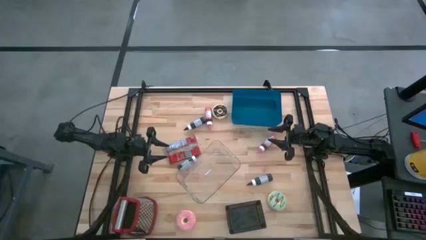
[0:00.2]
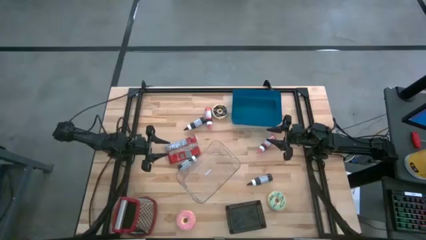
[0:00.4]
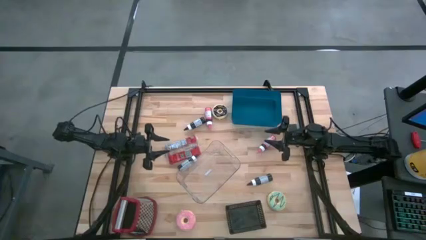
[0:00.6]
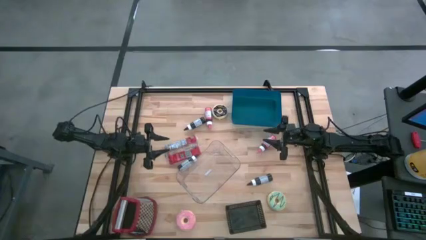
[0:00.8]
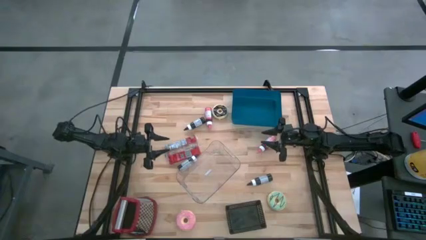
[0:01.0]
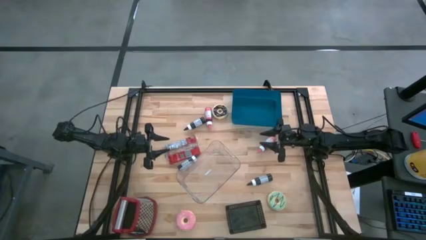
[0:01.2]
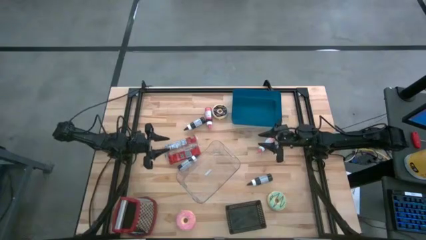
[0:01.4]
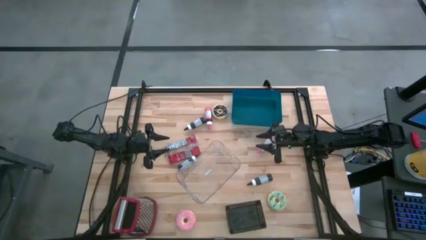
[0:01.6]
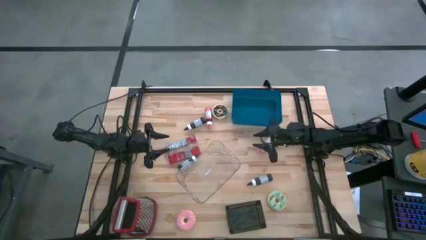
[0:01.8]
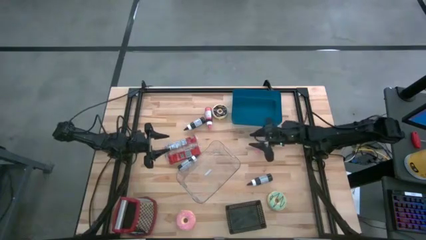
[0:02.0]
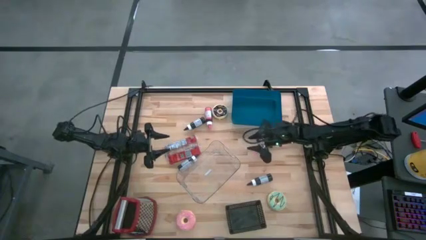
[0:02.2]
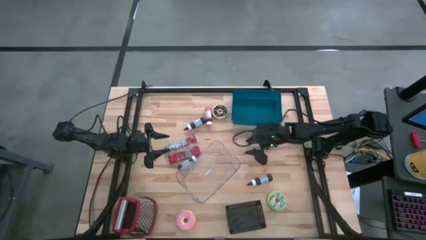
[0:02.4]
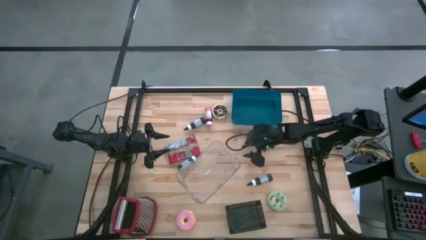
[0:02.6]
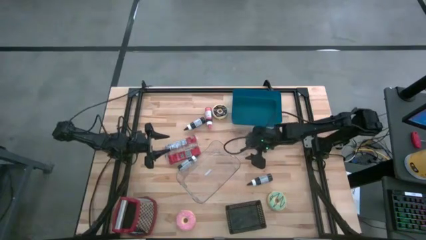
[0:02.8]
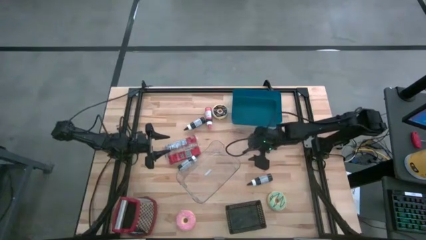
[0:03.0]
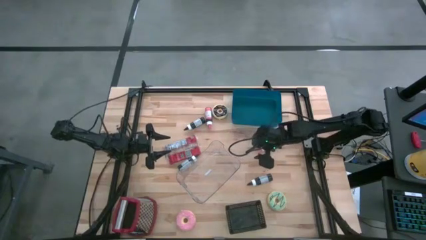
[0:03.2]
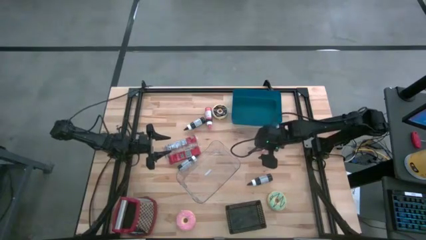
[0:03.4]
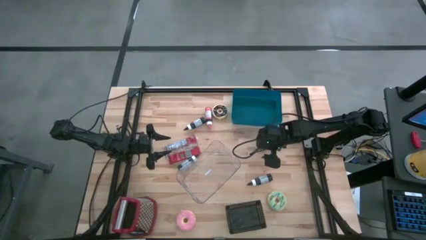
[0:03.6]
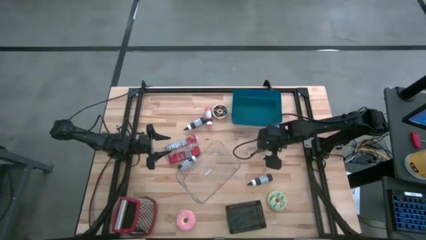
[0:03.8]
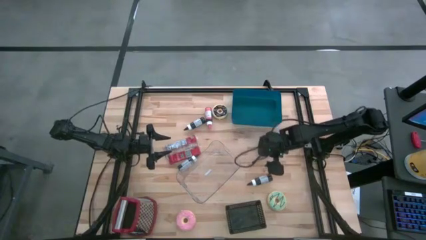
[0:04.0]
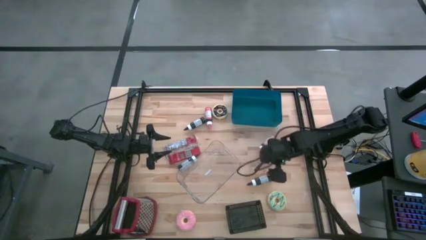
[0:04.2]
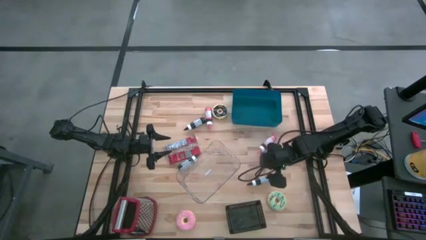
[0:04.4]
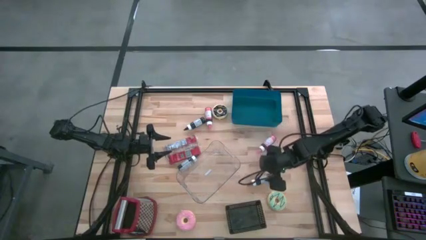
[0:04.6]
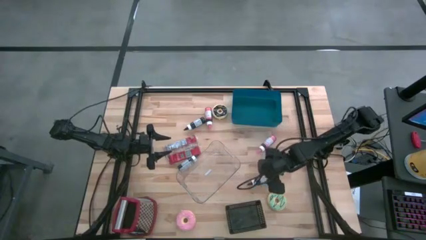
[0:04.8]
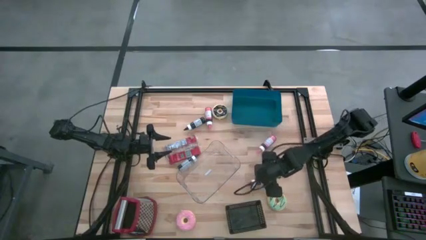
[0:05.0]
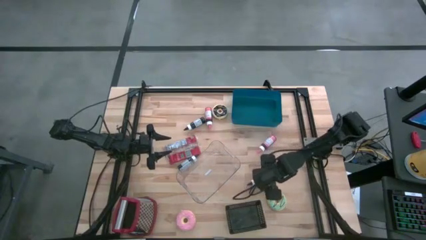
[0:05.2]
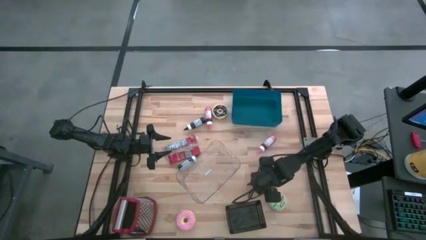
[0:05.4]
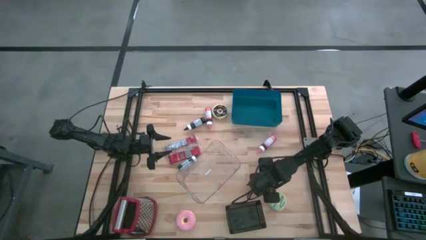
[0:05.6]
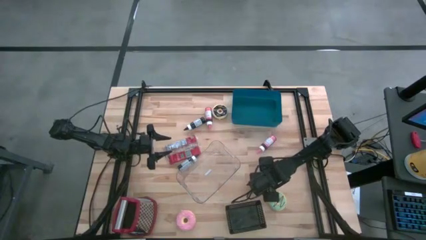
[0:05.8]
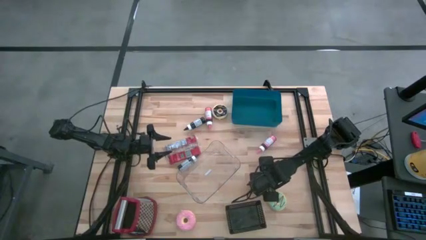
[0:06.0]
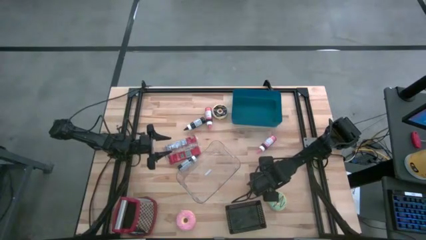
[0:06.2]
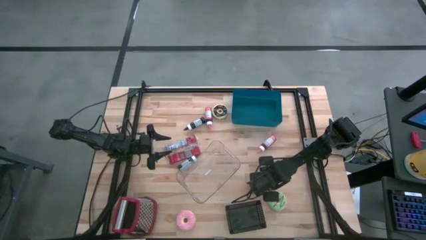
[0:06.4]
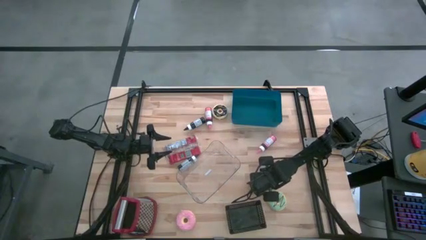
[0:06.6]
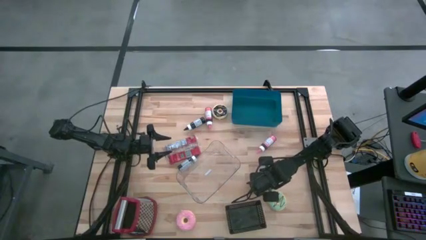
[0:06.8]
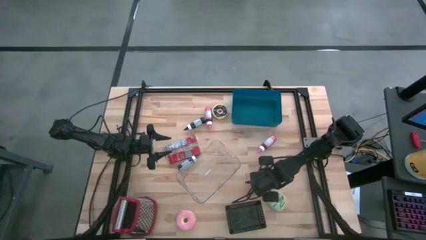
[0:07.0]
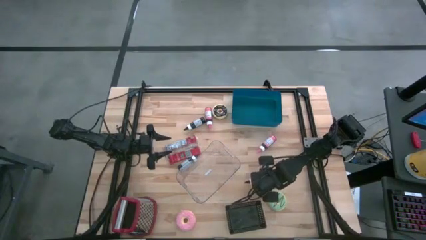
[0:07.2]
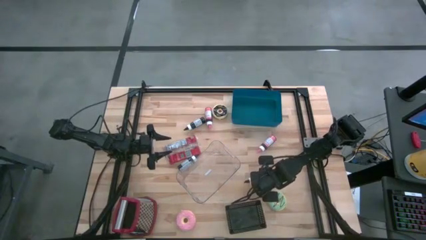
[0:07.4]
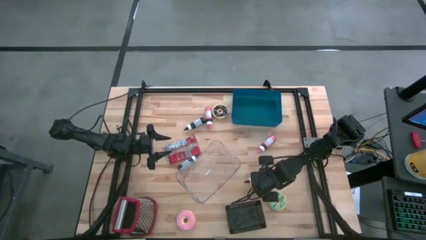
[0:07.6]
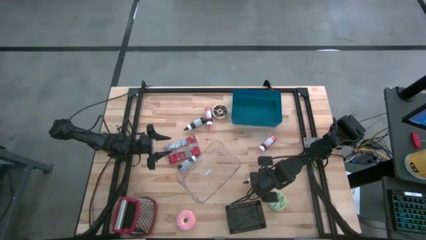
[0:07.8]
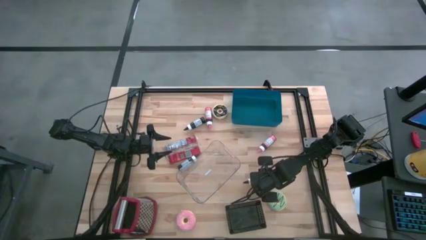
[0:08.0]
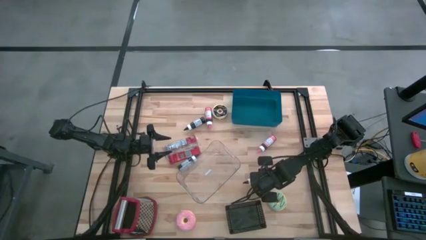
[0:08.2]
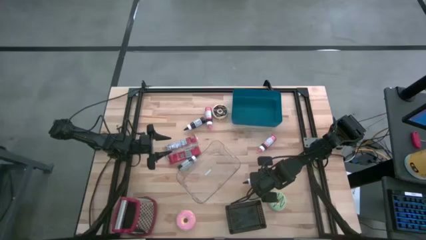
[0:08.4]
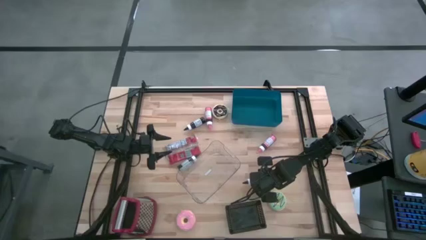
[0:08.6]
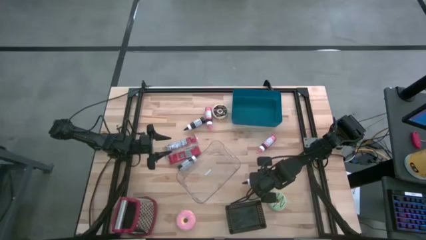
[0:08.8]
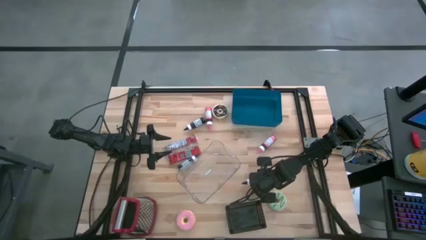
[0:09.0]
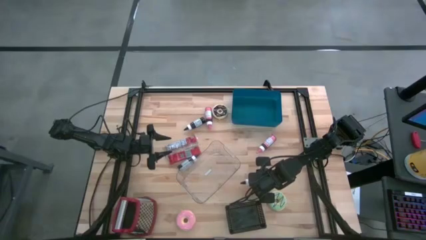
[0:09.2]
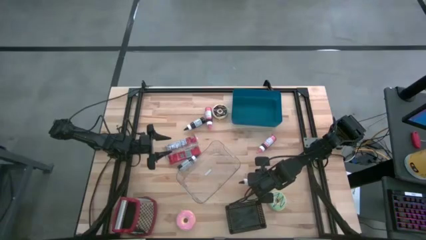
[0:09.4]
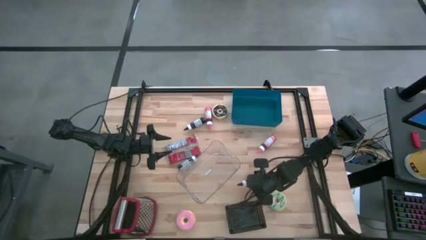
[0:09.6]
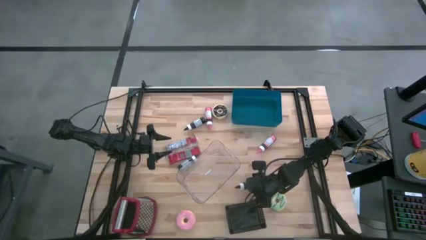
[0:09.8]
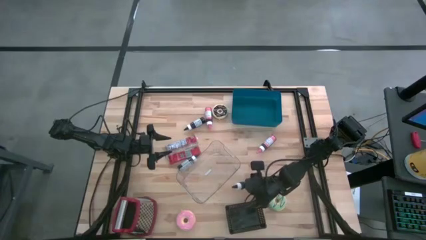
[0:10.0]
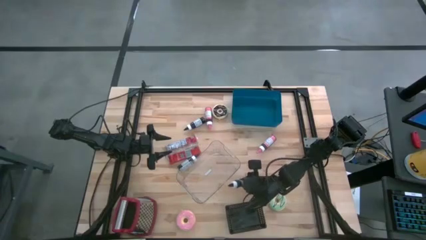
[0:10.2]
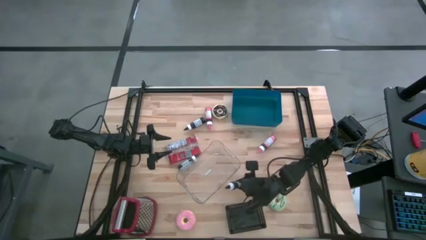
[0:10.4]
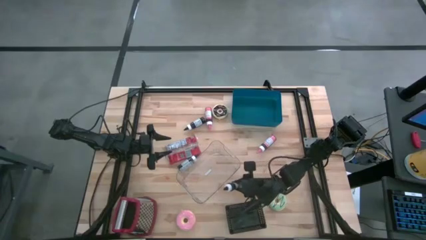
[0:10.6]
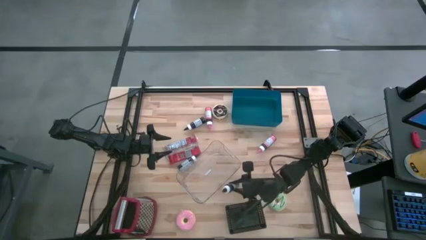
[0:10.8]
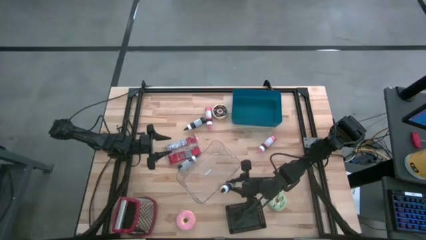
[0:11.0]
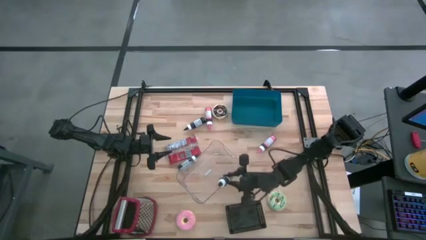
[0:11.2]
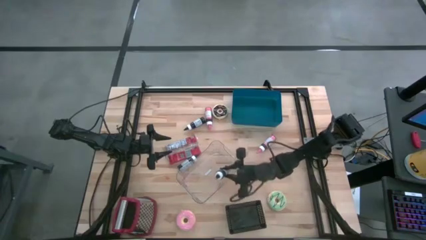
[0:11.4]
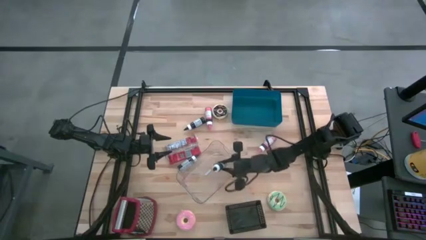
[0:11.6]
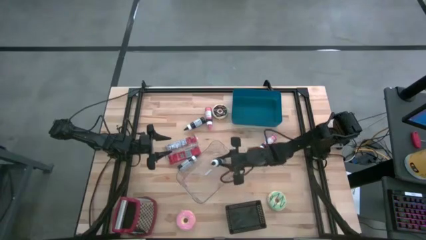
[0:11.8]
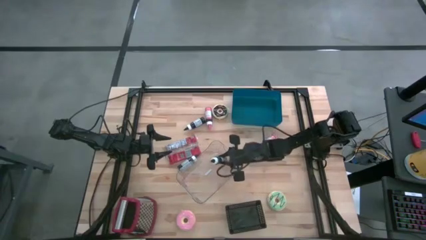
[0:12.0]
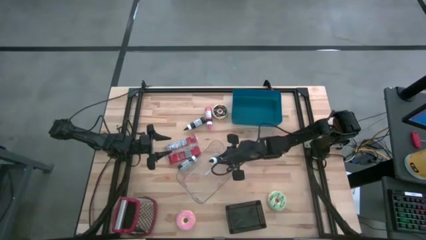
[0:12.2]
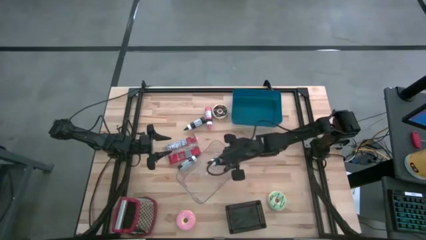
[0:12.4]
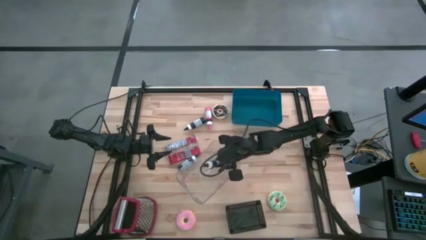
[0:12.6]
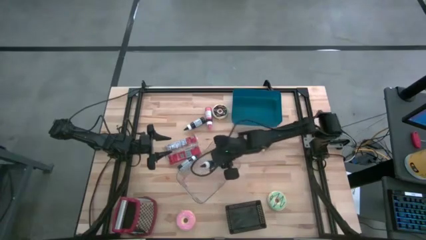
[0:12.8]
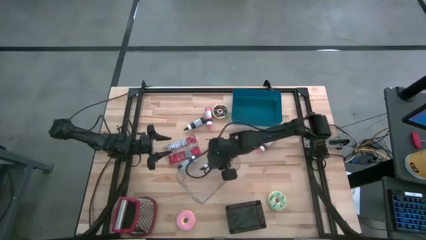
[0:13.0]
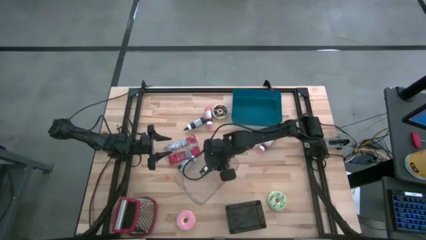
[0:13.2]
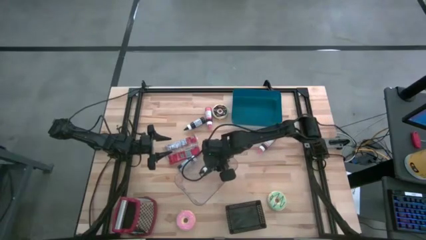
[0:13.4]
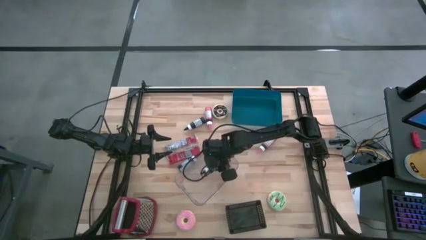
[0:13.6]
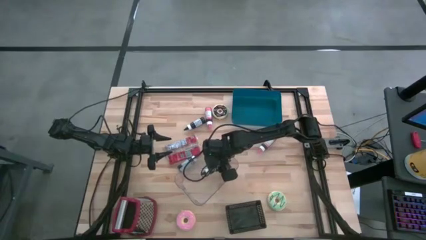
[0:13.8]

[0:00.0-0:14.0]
Put the right black food coloring bottle into the transparent bin

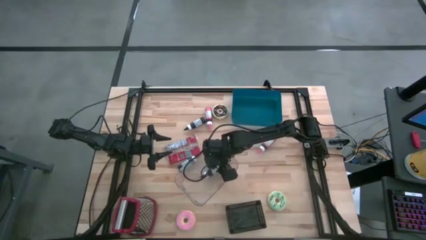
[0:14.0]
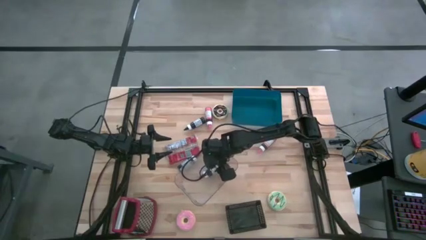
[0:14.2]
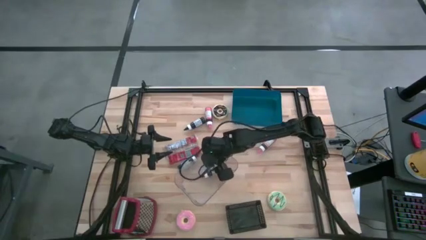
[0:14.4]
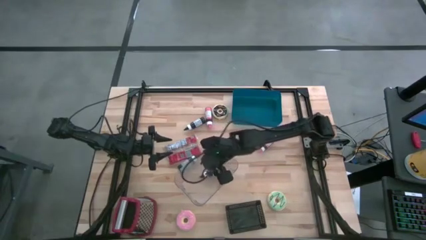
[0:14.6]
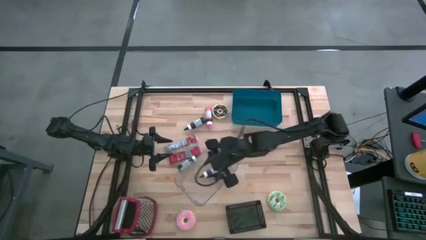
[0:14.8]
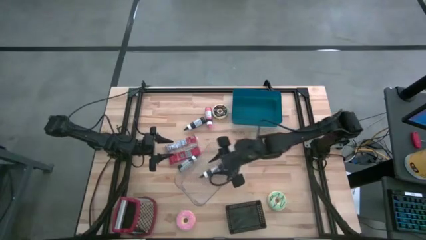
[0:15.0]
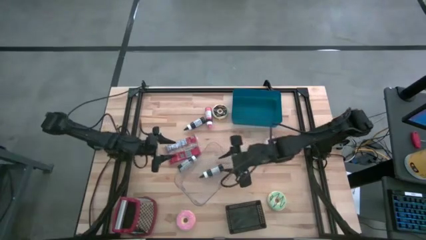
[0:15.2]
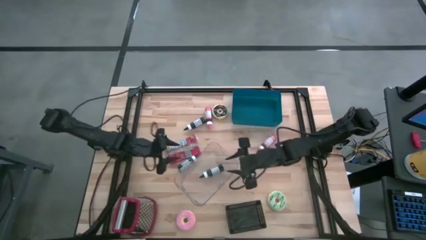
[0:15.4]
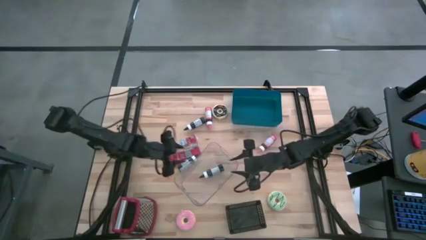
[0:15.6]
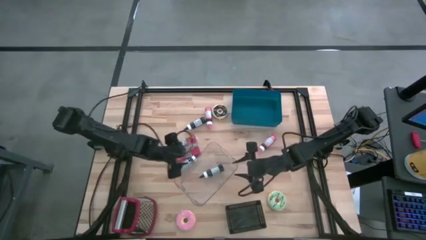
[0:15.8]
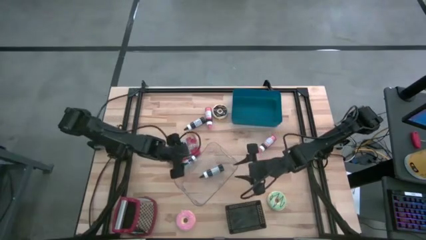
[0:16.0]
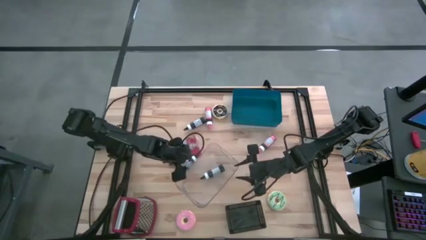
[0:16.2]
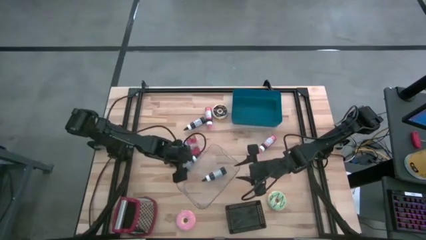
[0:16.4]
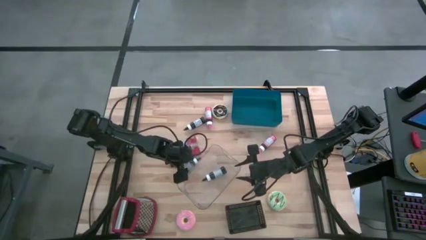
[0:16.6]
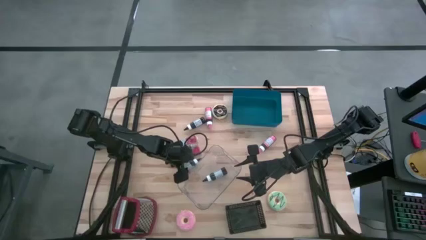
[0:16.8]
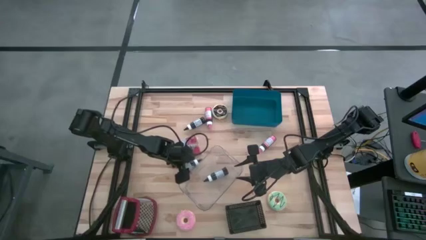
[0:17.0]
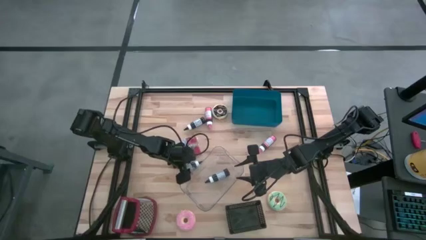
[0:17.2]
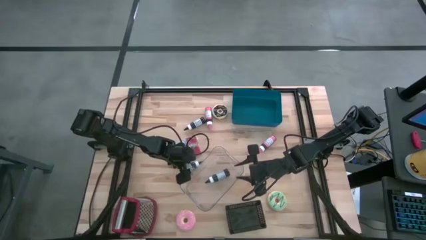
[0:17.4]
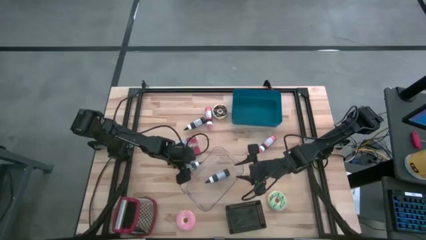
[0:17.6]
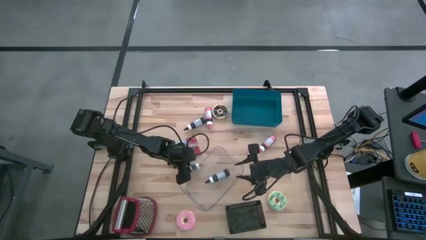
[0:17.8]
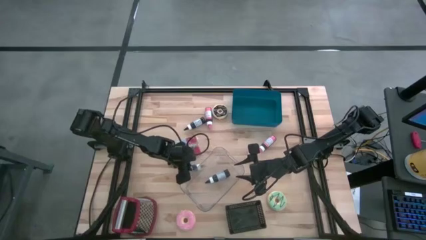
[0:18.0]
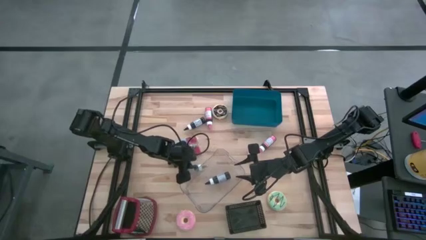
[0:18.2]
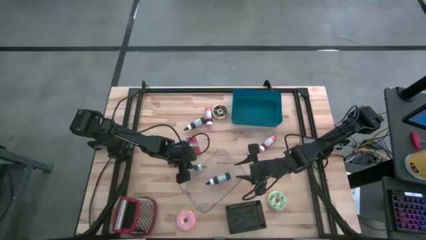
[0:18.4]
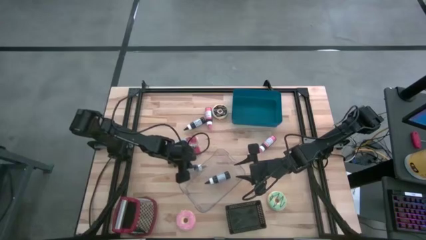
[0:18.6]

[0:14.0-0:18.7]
Put the bottom black food coloring bottle into the transparent bin
